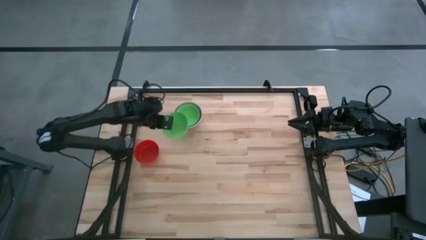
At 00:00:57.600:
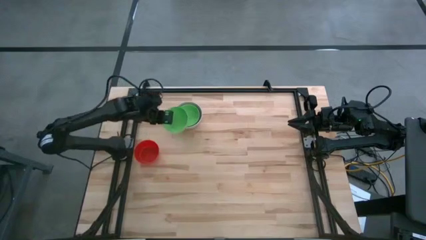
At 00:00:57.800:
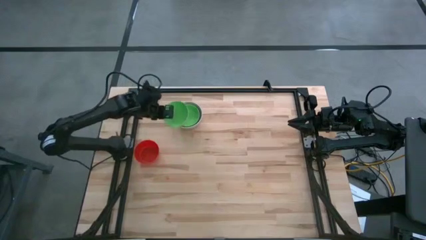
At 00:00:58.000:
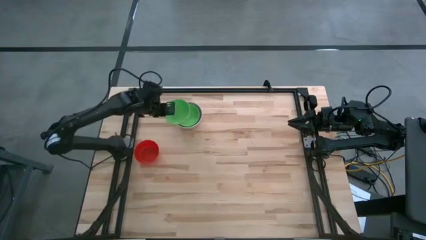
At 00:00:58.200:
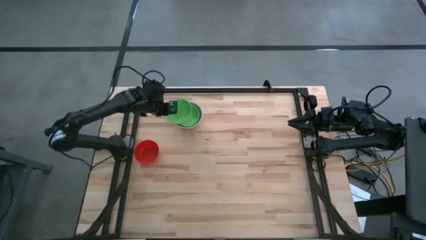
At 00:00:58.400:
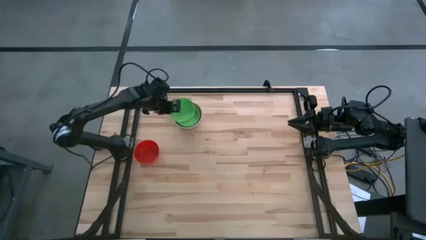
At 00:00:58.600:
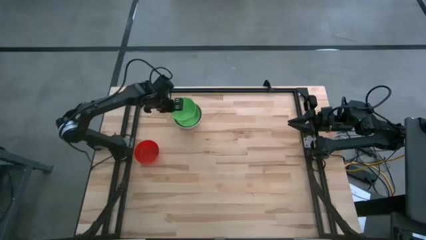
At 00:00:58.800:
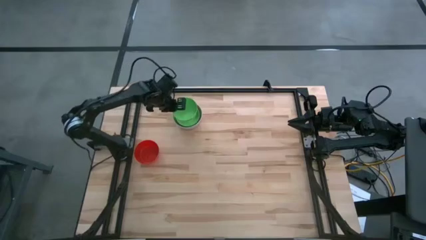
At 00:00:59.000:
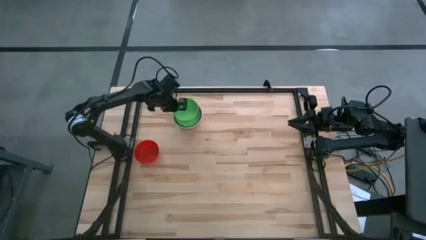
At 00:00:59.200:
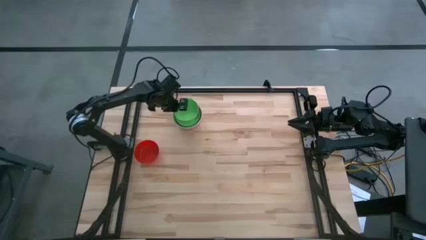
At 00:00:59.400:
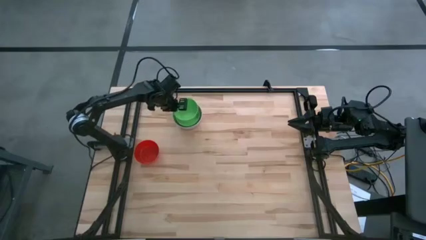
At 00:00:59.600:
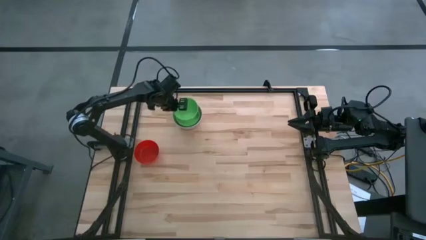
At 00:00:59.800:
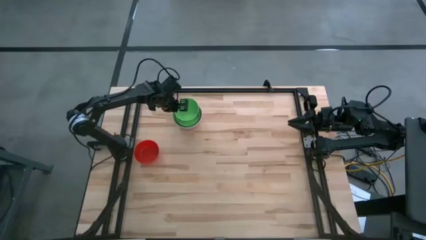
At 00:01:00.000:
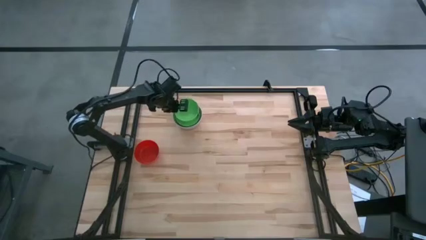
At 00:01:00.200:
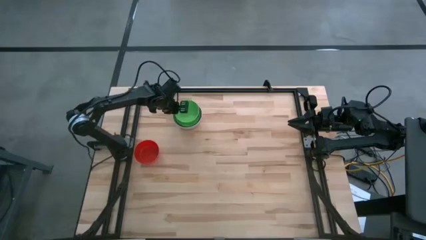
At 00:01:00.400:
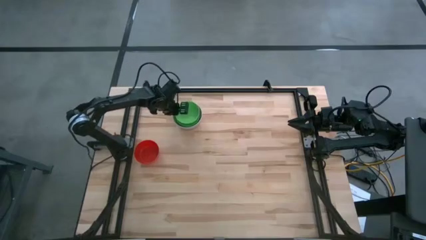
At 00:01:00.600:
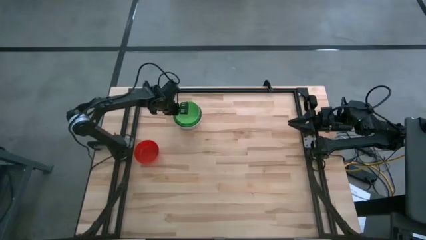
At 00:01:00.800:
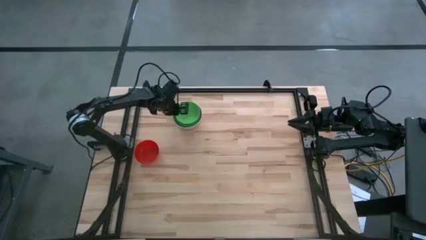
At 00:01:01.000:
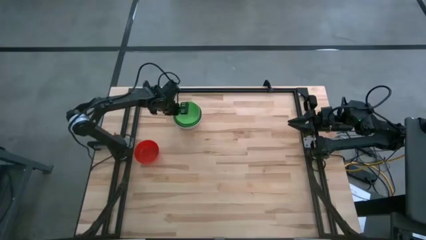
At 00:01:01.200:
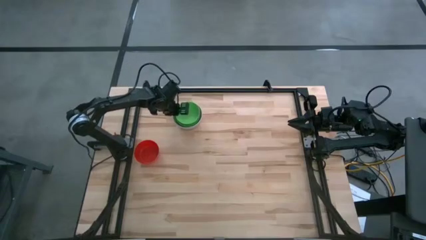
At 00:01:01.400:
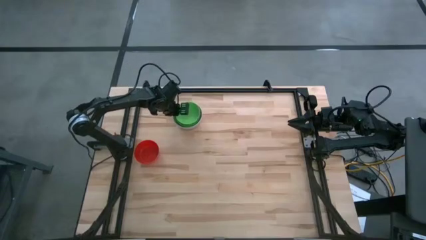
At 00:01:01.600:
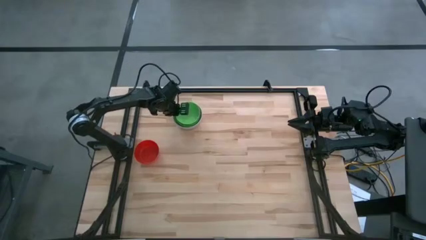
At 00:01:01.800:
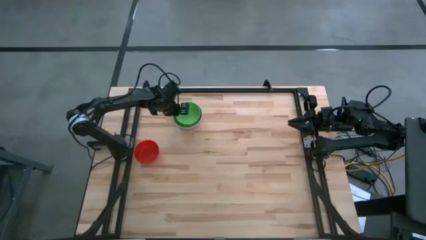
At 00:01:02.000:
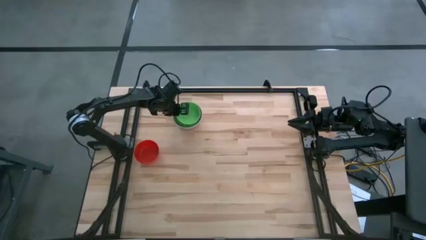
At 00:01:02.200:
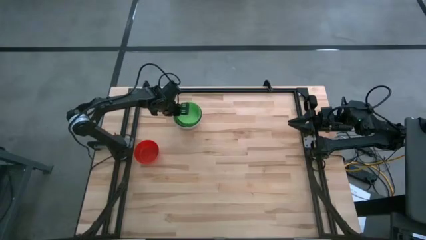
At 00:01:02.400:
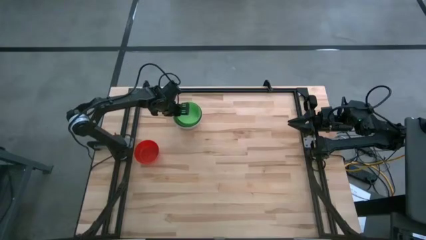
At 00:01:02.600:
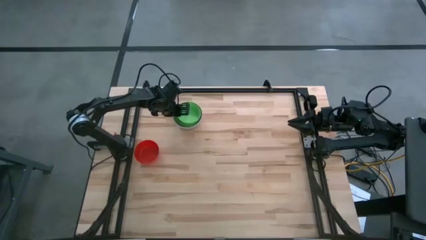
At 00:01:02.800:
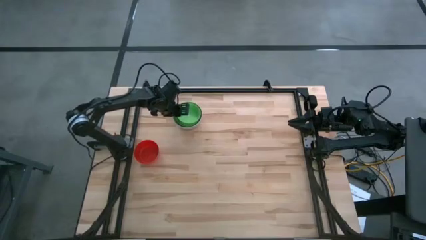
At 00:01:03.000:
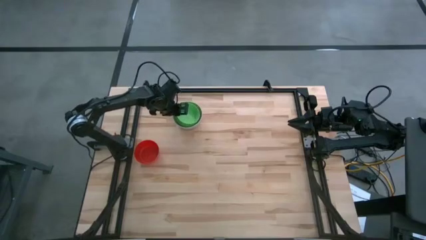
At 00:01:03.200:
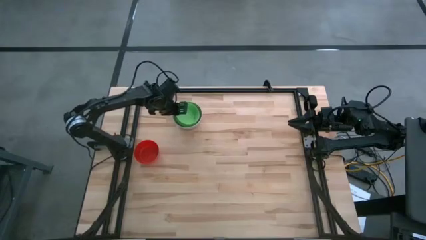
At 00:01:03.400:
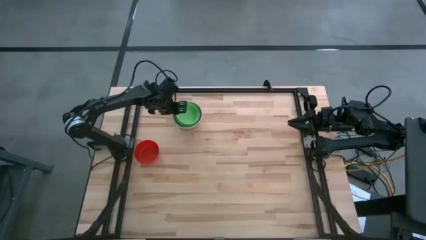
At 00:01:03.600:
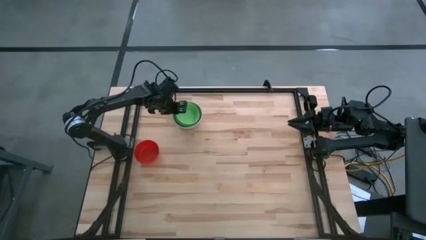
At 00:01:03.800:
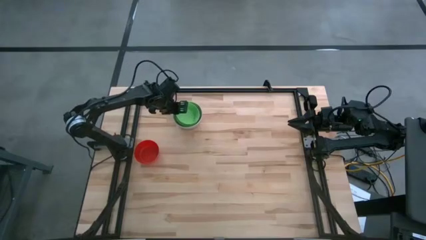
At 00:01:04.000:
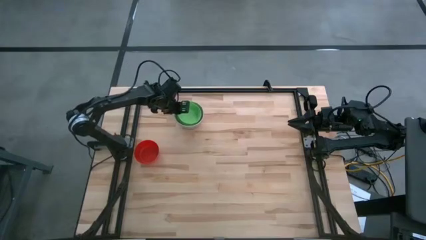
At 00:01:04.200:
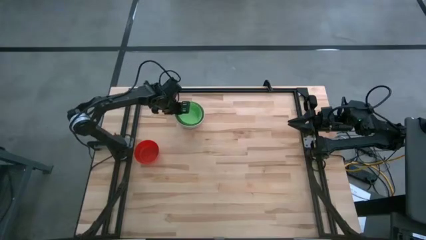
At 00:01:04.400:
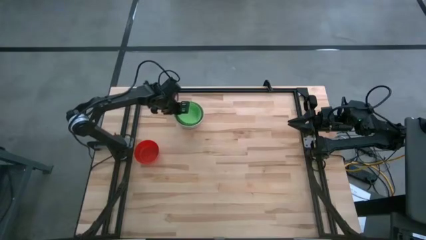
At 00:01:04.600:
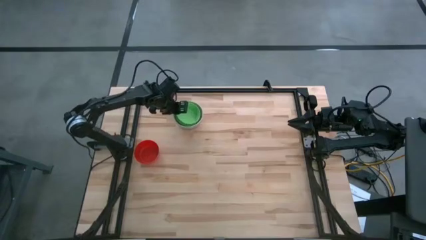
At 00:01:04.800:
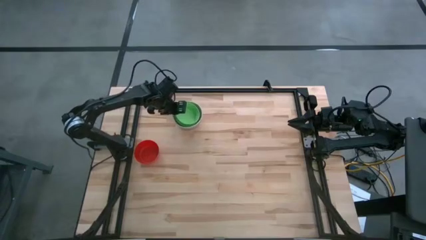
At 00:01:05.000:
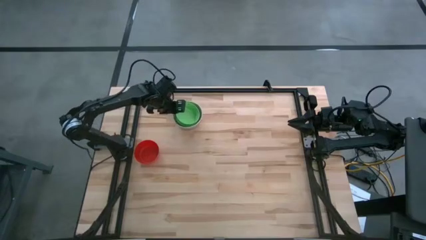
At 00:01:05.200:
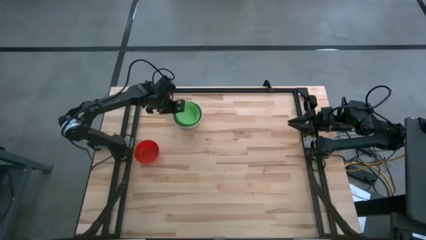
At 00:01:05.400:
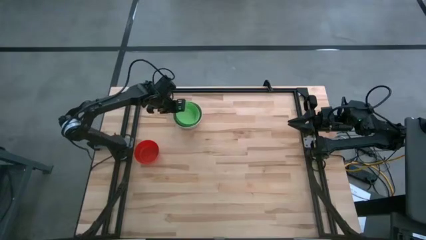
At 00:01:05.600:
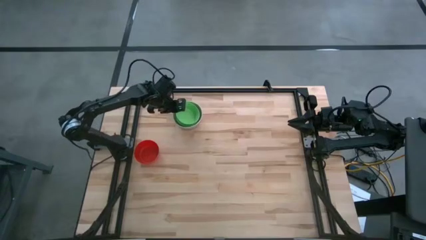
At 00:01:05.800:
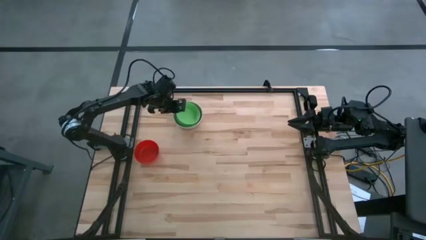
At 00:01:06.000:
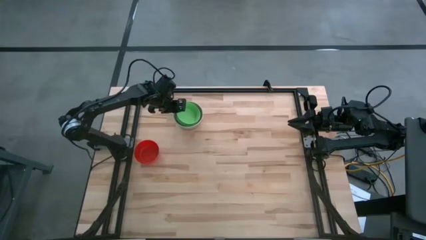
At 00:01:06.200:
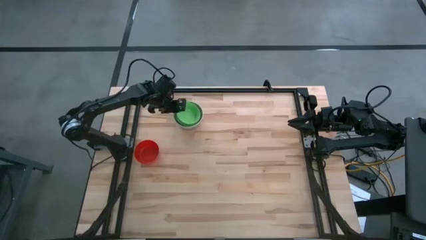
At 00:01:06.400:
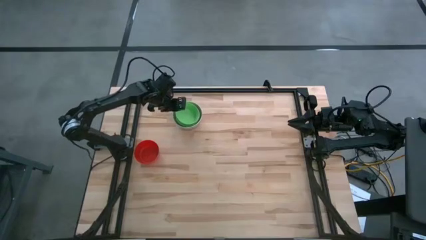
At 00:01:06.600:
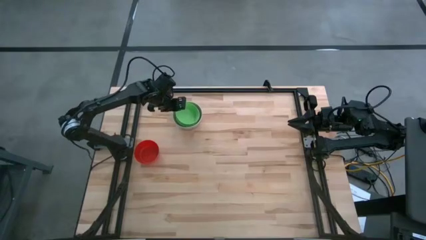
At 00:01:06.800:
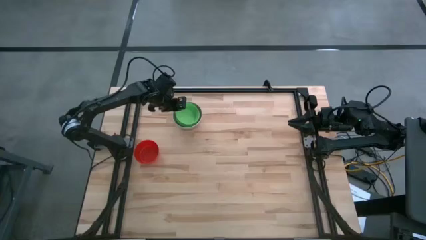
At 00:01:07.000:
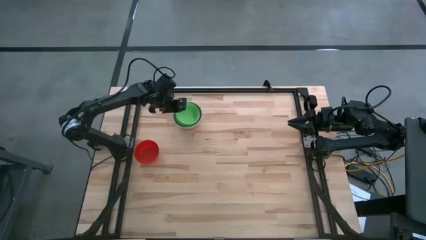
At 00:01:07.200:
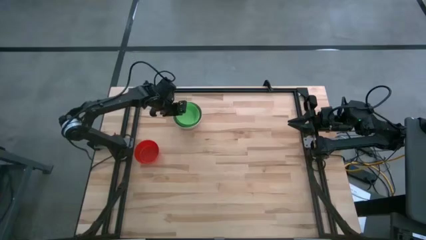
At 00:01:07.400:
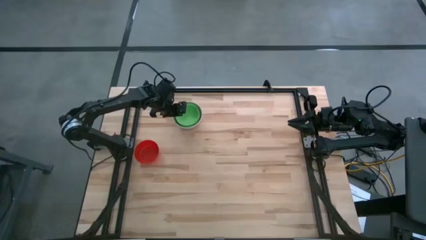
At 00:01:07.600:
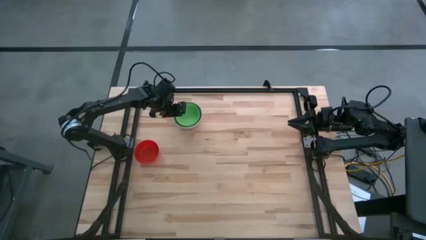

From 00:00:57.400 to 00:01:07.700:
Stack the bottom green bowl on the top green bowl
